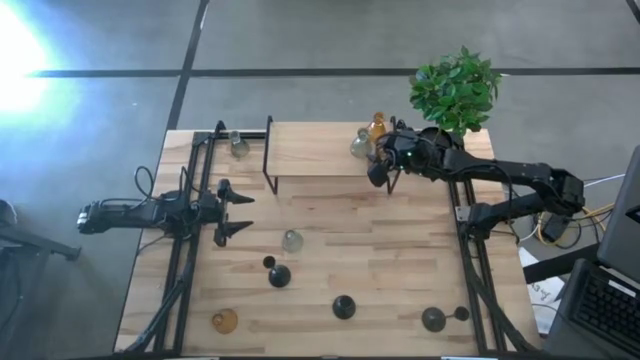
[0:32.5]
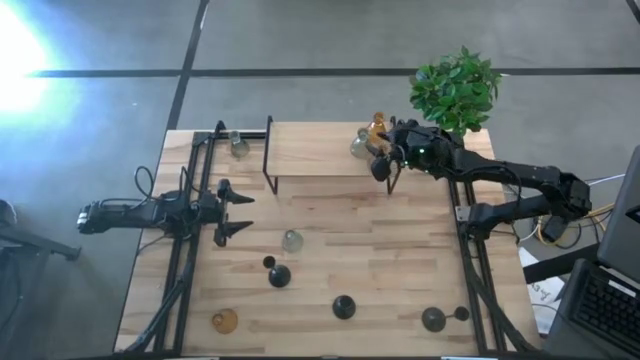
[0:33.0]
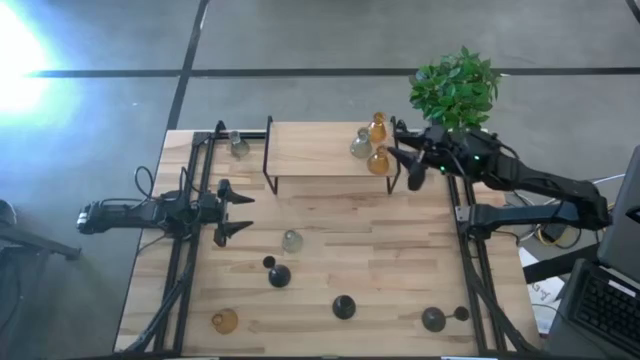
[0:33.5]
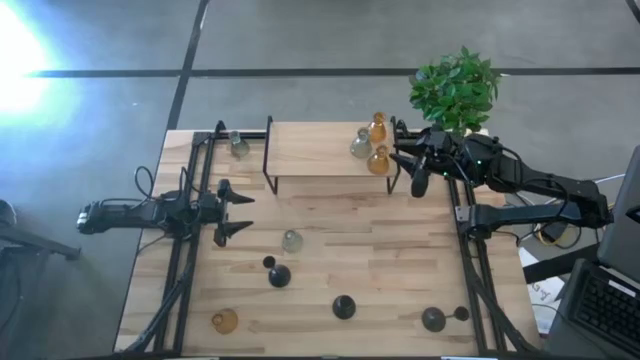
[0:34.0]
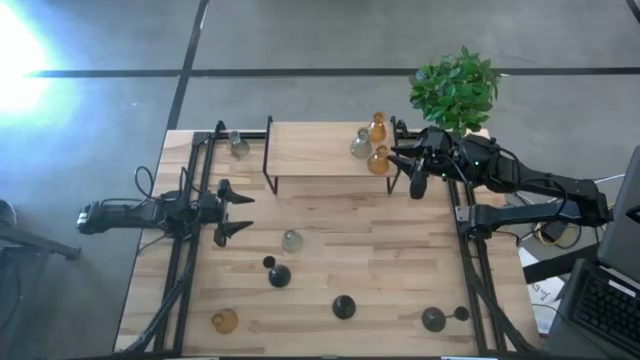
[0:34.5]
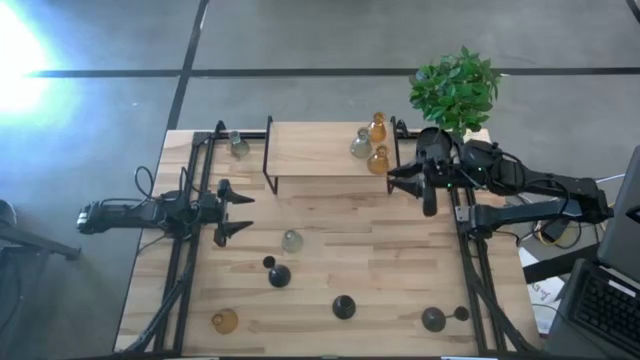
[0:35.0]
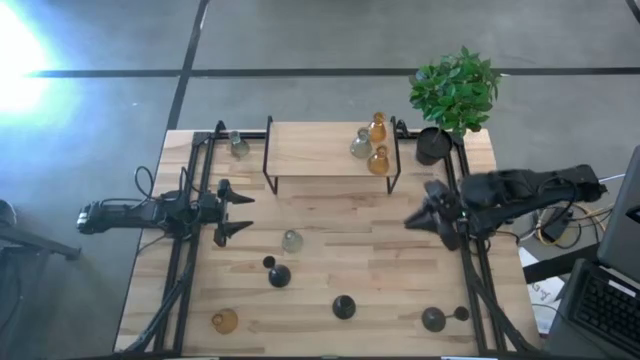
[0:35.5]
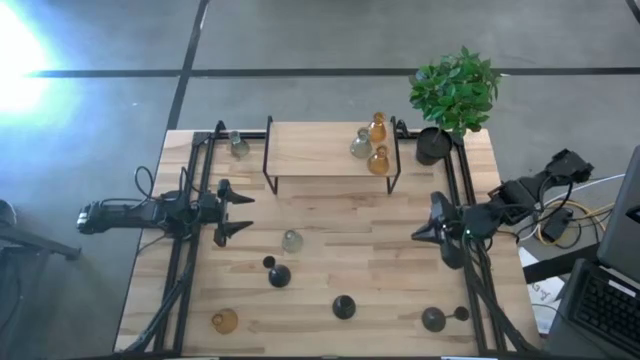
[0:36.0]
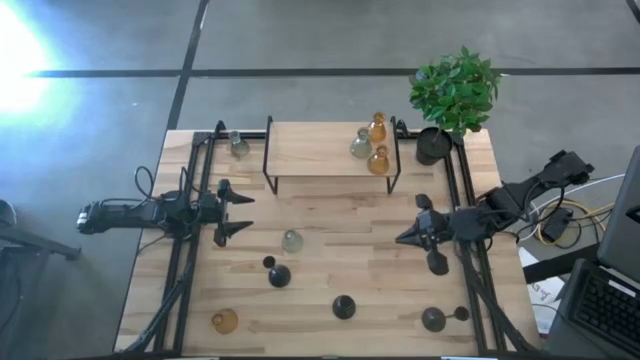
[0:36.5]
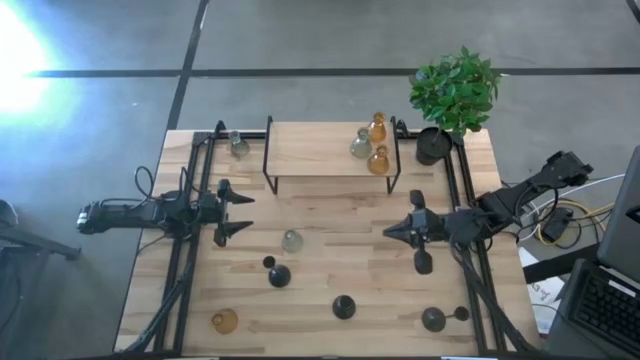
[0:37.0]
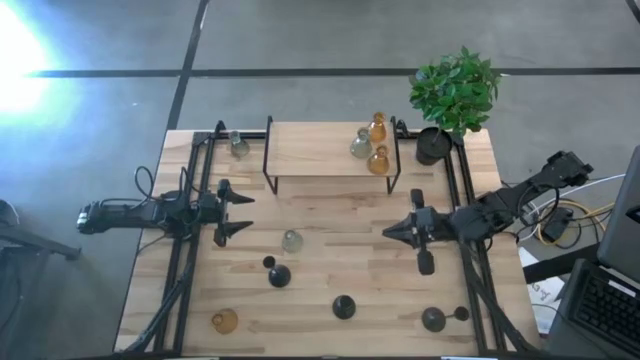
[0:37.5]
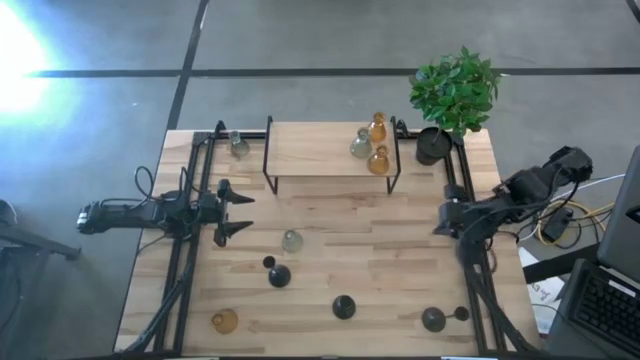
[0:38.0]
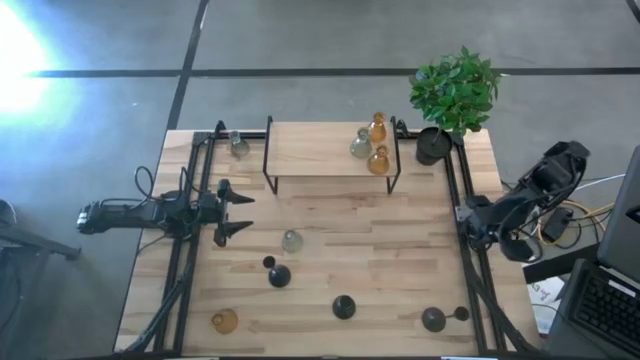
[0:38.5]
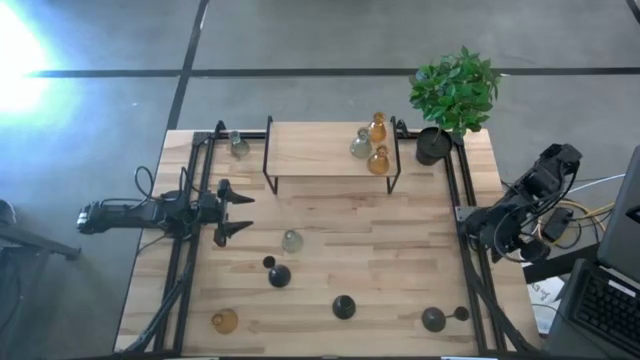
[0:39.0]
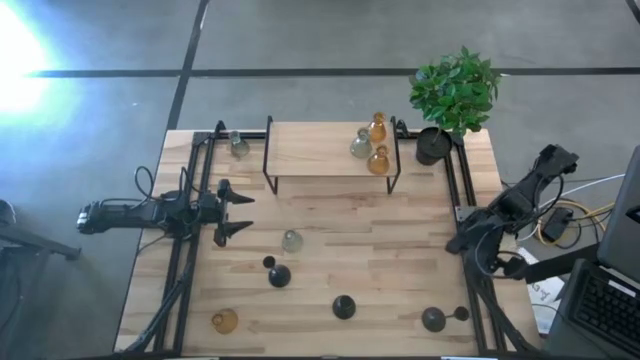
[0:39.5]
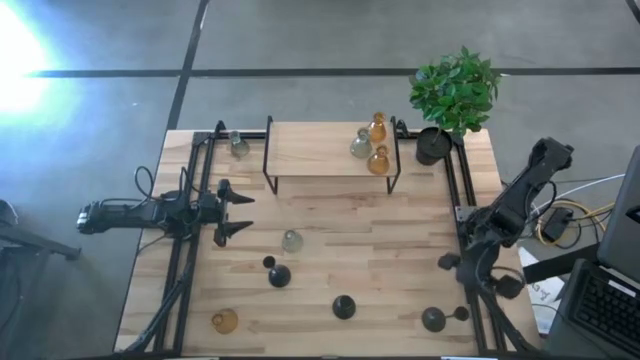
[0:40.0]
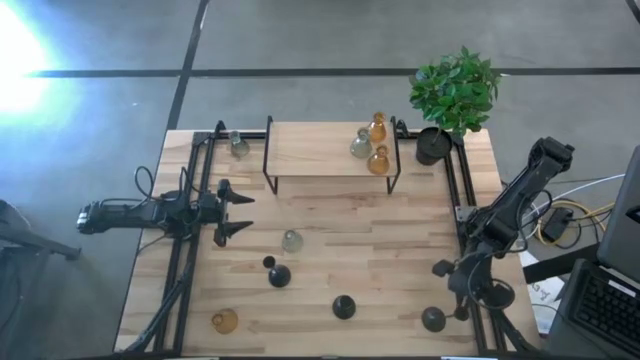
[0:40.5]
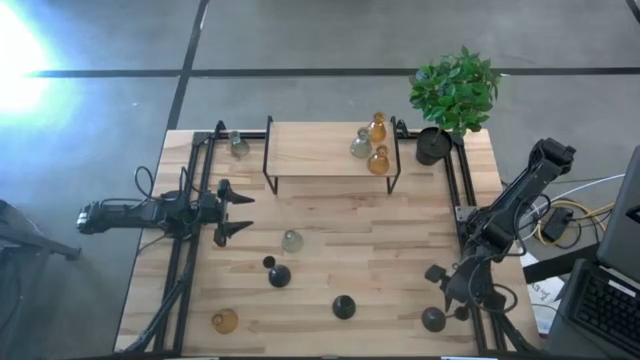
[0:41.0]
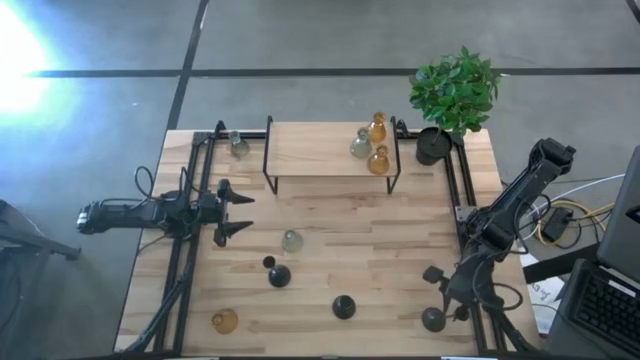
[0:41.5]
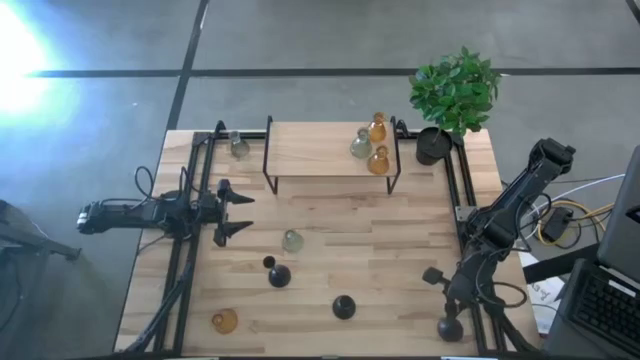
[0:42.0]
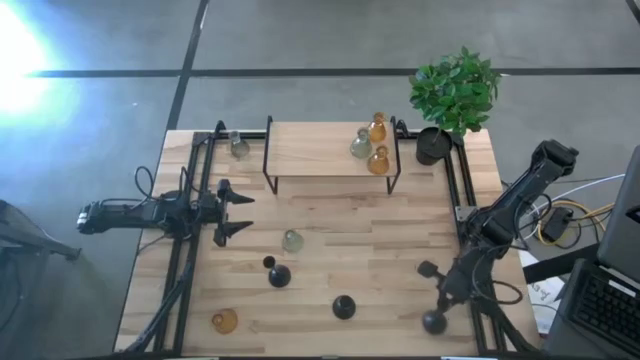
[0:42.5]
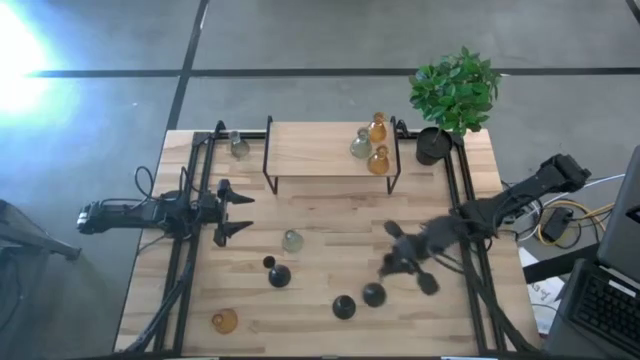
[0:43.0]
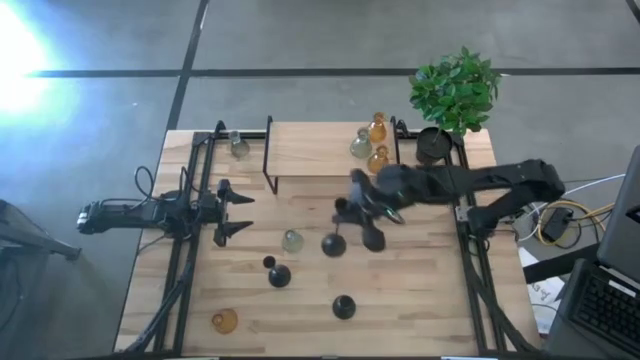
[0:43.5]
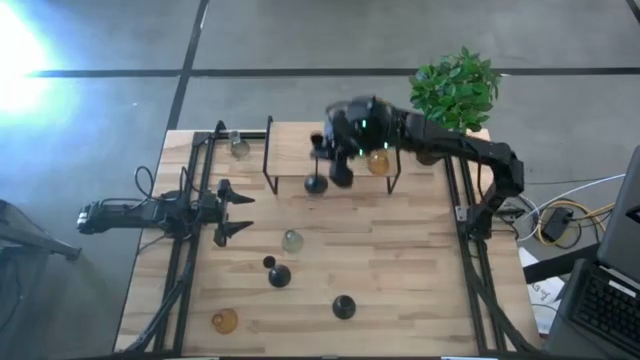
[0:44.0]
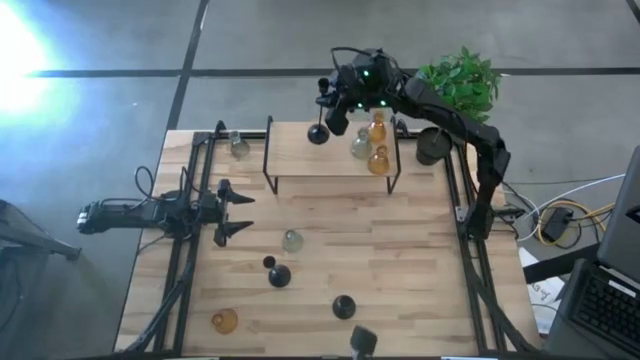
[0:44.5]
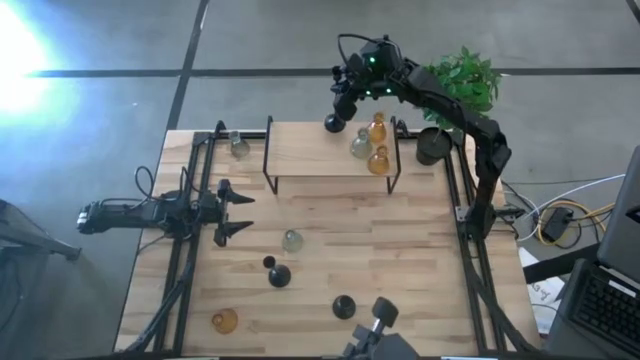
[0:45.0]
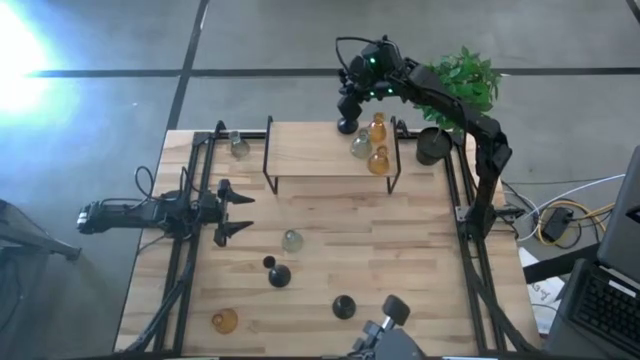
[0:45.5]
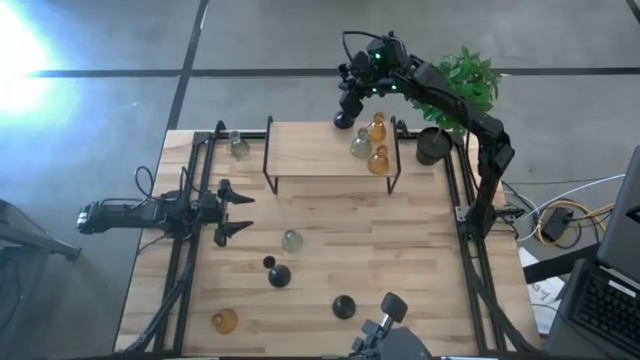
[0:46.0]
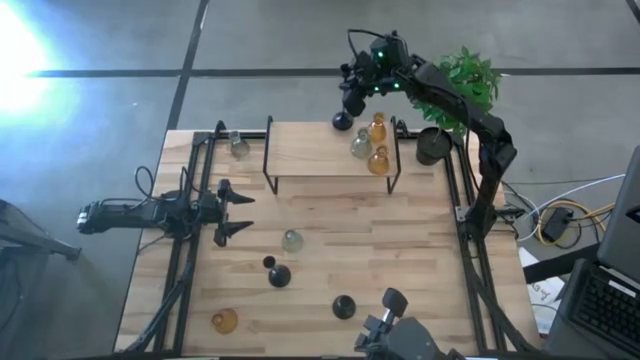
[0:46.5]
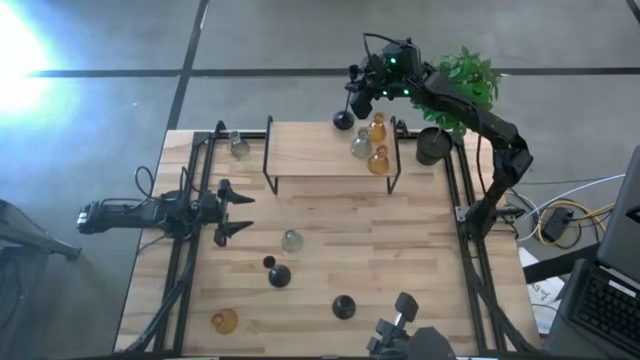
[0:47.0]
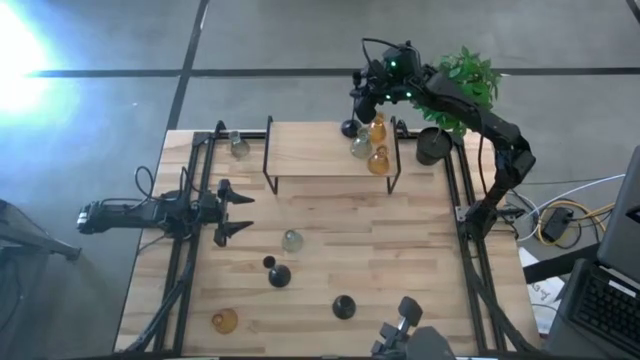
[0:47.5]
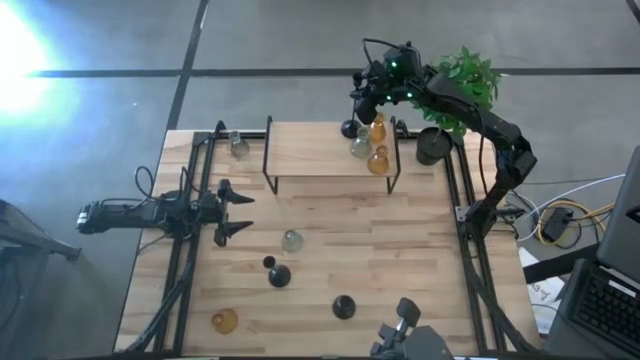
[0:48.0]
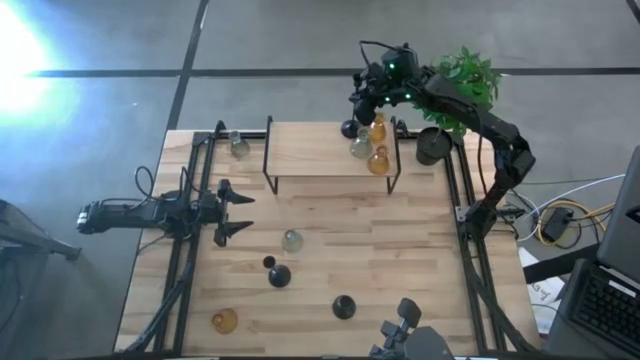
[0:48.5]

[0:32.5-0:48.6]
Task: Pick & Place candle stick holders
Put the bottom right black candle holder on the shelf
